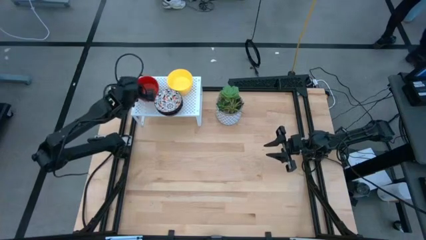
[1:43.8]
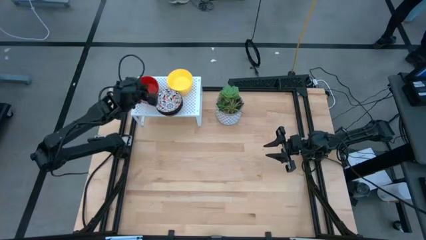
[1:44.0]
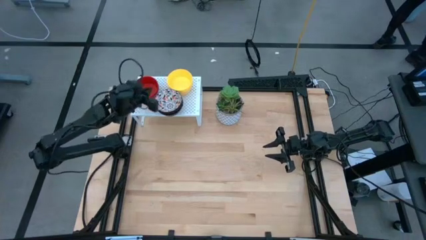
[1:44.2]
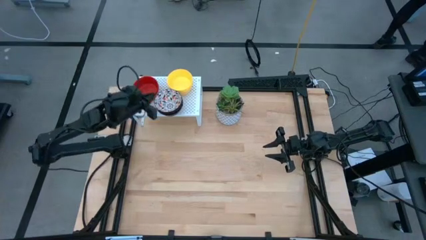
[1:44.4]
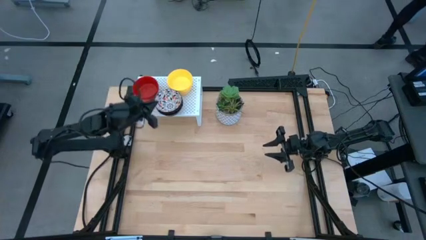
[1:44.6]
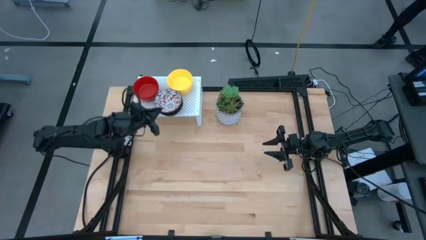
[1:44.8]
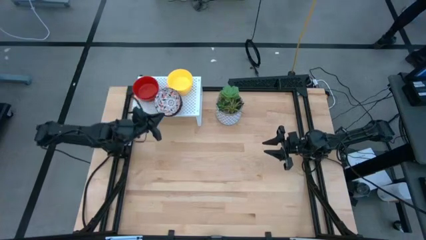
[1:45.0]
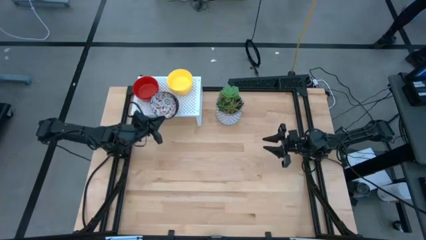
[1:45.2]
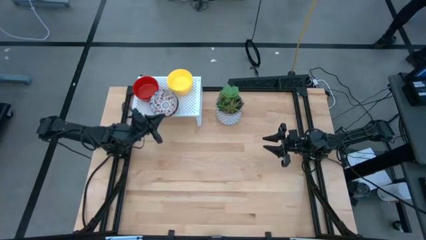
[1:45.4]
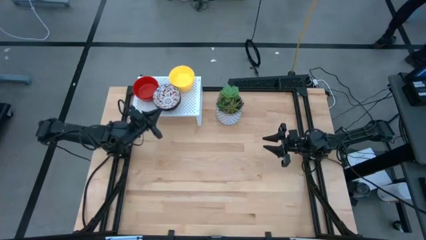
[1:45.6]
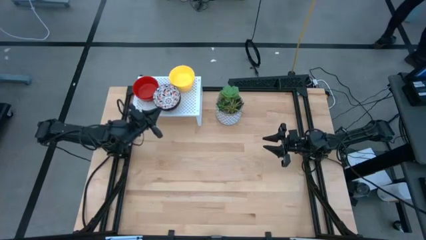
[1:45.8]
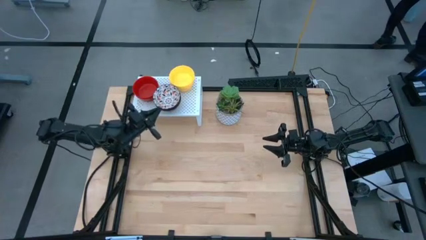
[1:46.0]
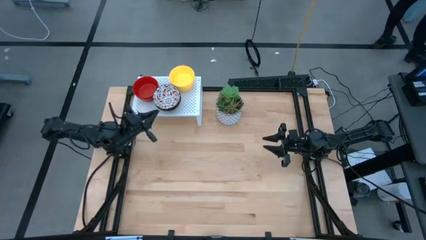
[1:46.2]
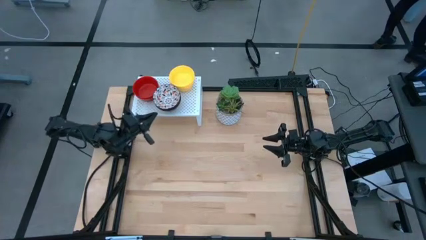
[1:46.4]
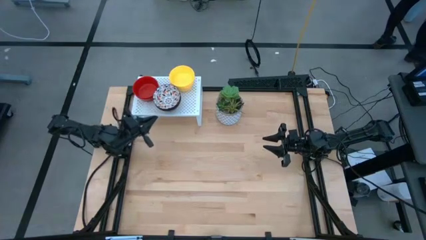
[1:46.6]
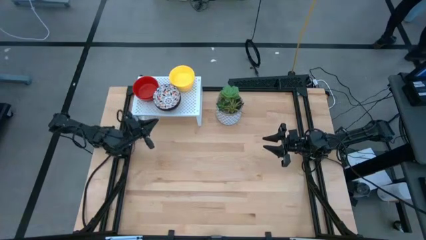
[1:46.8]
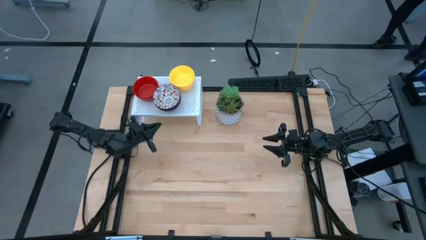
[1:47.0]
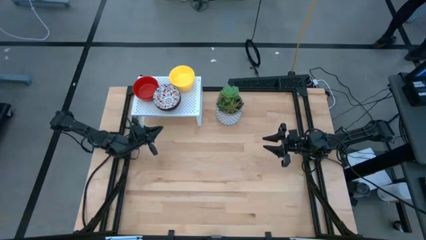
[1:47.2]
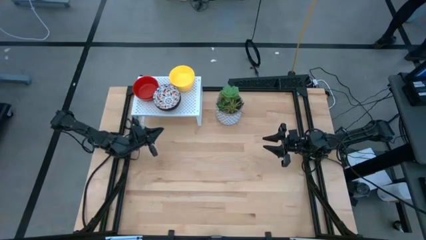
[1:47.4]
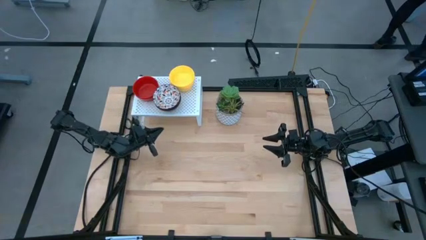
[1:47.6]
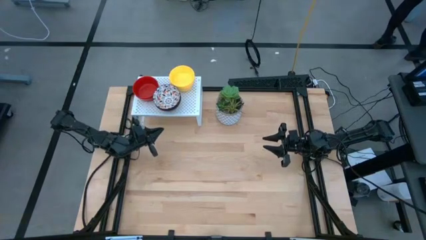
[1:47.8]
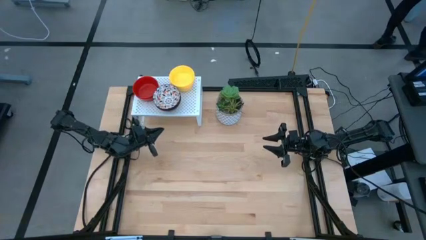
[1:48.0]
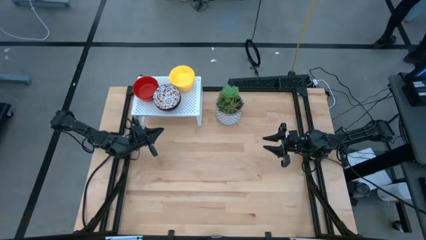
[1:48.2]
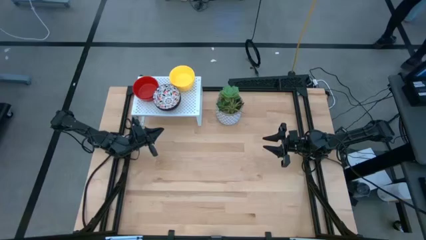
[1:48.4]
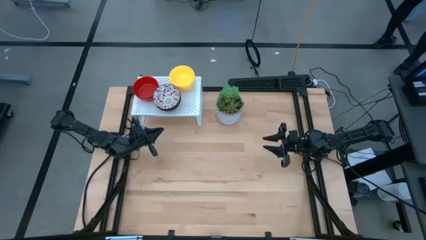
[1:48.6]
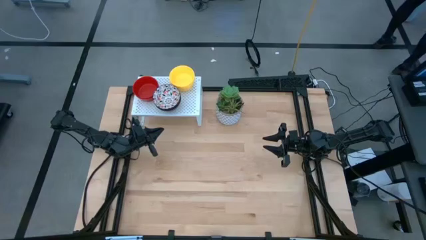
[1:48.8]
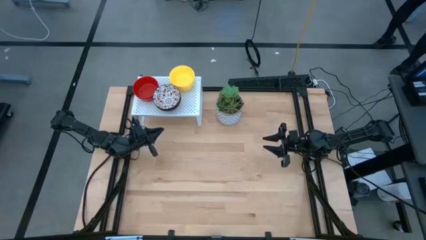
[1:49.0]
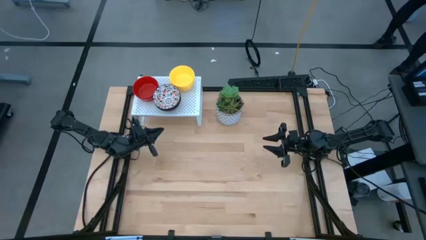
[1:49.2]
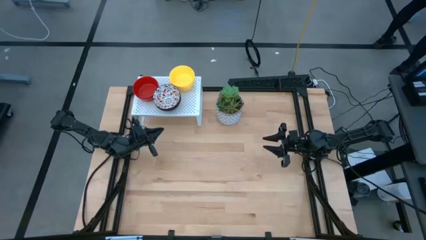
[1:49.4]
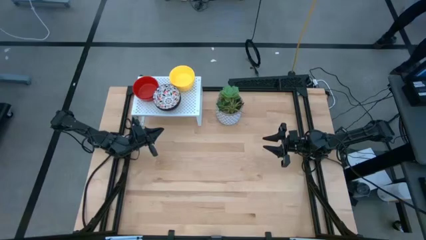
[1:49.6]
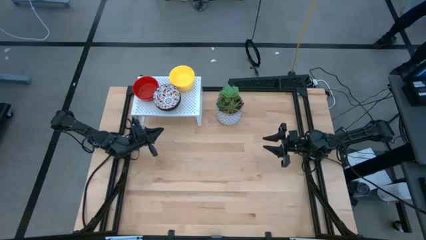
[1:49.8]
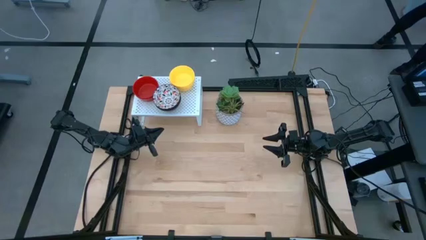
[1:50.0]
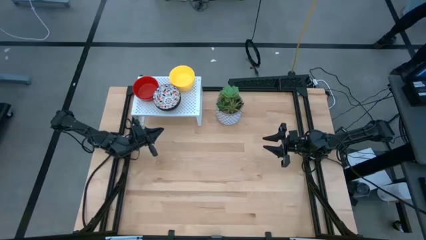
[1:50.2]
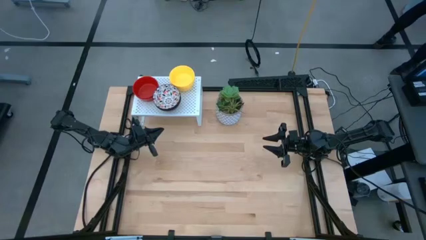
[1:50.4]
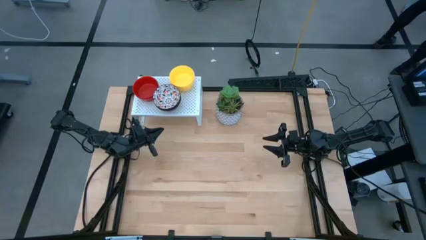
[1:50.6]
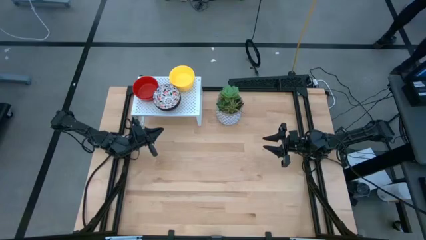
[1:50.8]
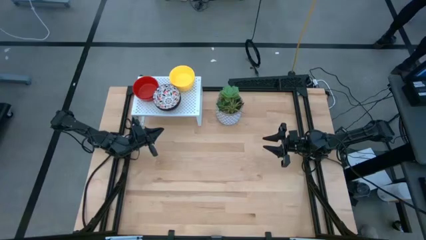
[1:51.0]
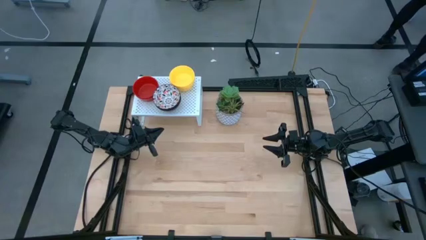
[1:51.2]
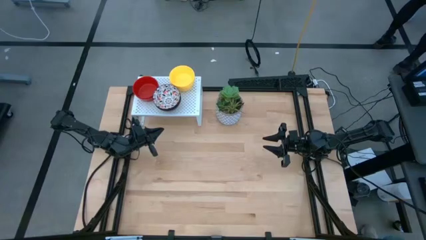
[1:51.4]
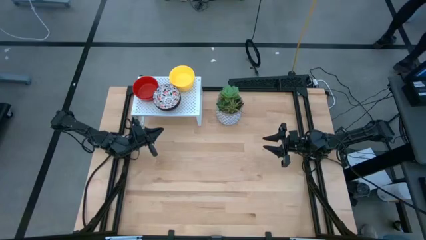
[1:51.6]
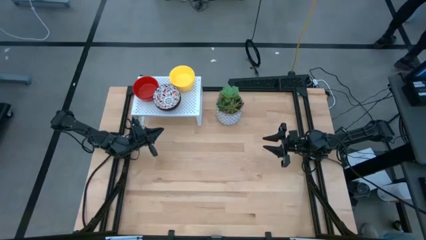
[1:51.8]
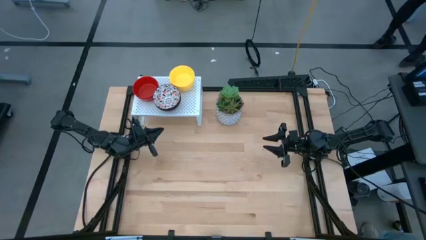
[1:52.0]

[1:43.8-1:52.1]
Task: Pick & Place Mini bowls
Return to Home Position

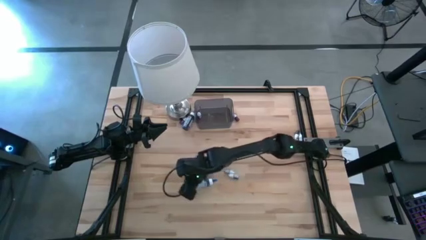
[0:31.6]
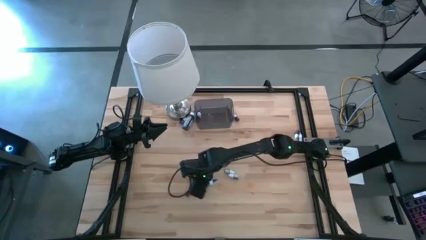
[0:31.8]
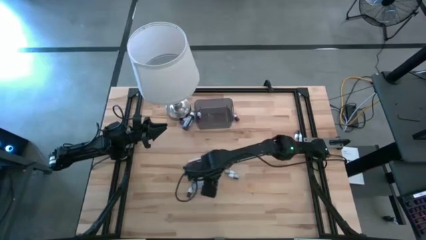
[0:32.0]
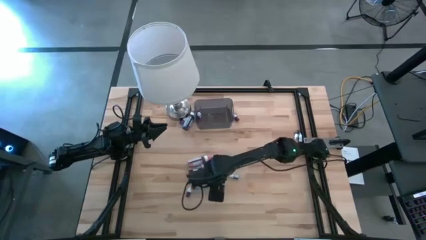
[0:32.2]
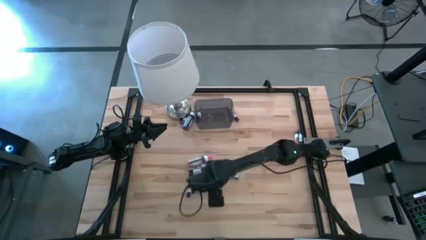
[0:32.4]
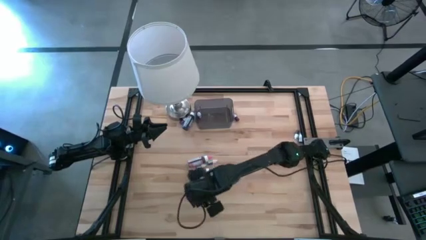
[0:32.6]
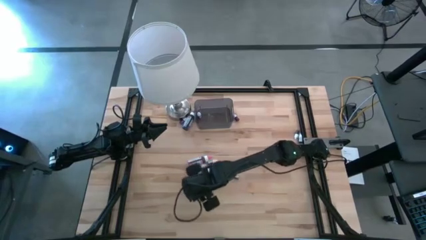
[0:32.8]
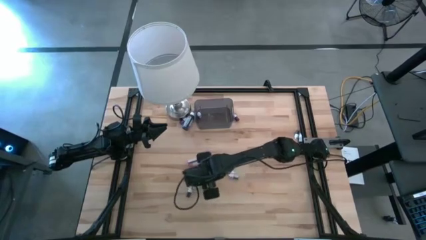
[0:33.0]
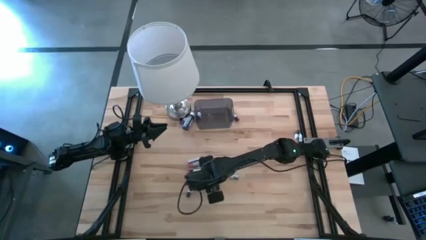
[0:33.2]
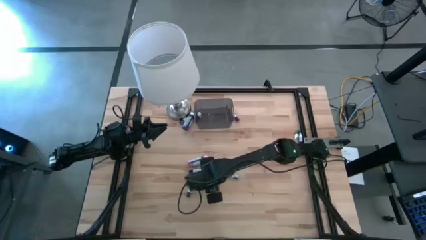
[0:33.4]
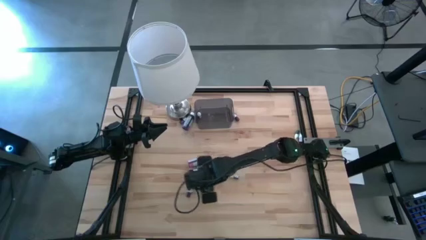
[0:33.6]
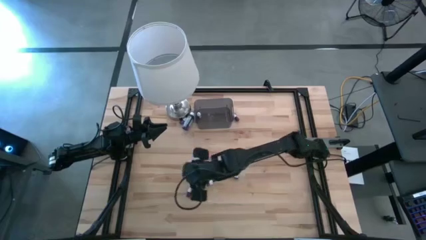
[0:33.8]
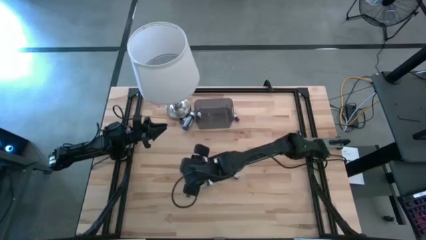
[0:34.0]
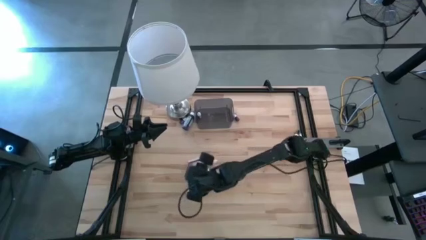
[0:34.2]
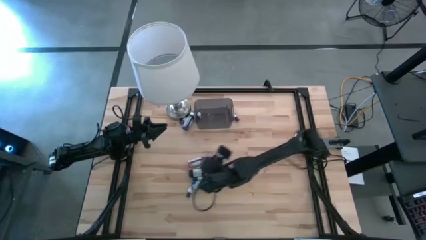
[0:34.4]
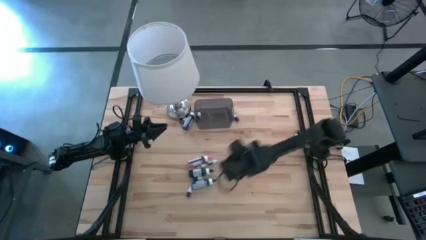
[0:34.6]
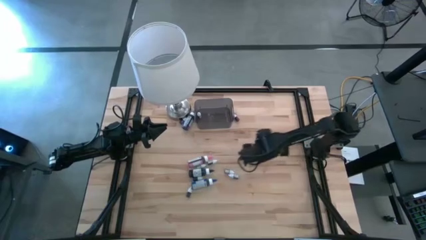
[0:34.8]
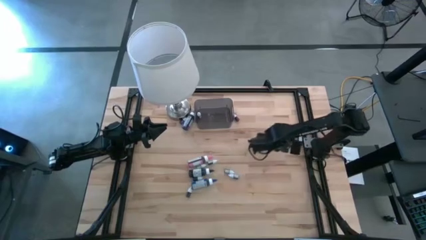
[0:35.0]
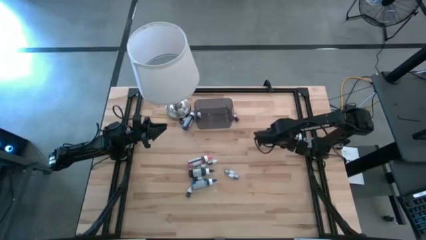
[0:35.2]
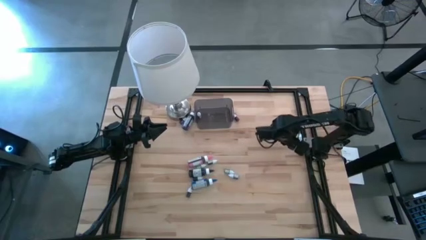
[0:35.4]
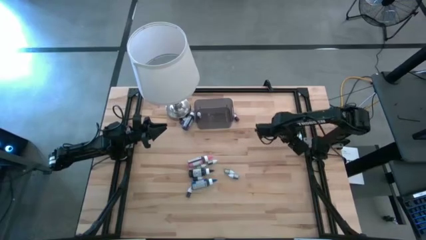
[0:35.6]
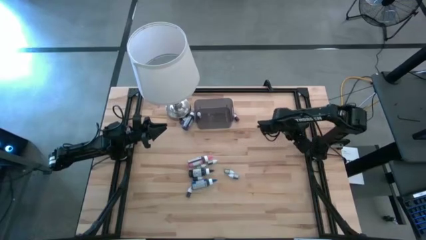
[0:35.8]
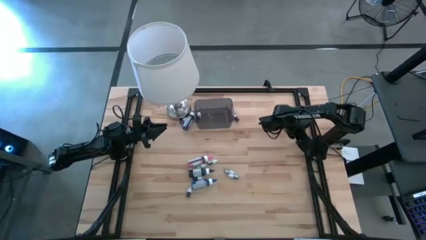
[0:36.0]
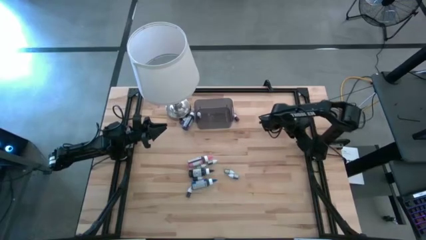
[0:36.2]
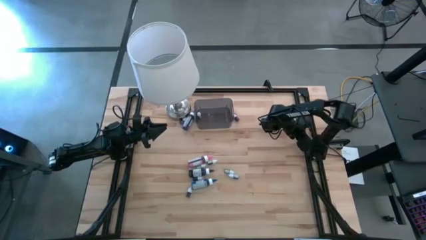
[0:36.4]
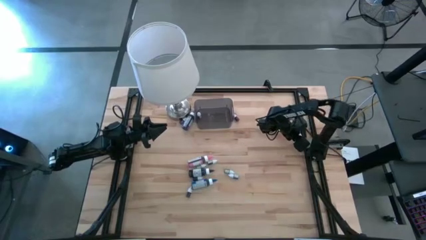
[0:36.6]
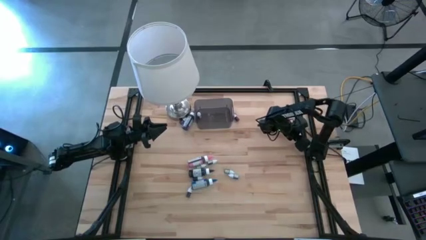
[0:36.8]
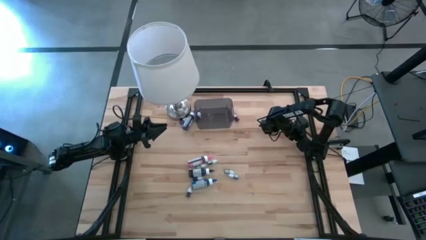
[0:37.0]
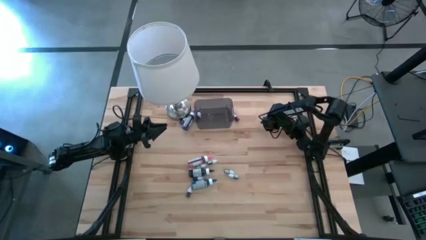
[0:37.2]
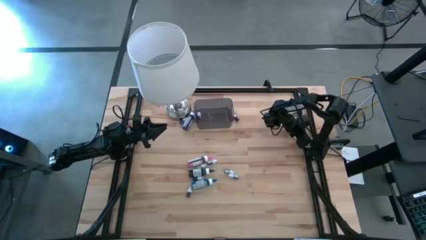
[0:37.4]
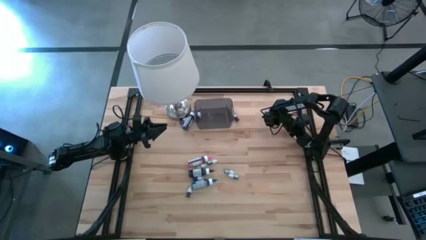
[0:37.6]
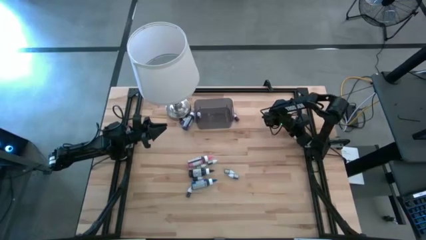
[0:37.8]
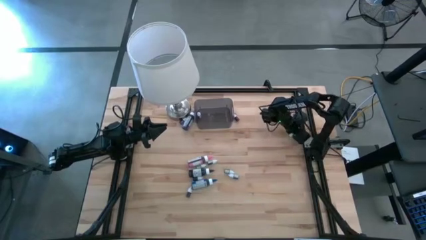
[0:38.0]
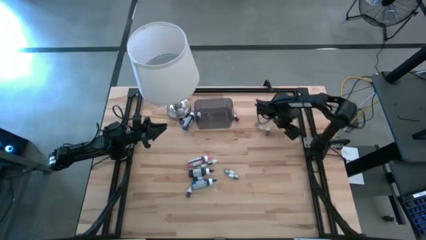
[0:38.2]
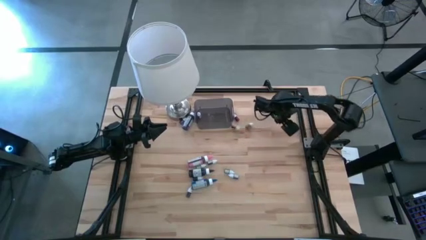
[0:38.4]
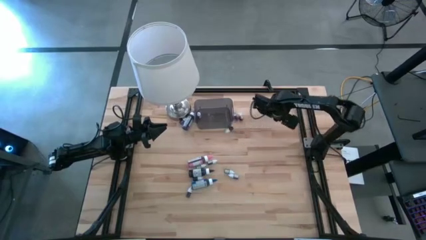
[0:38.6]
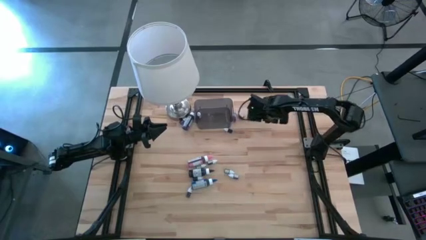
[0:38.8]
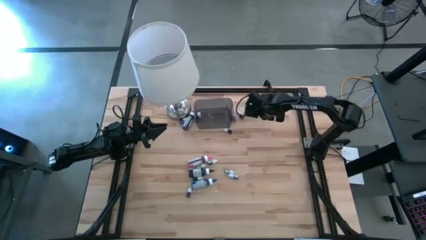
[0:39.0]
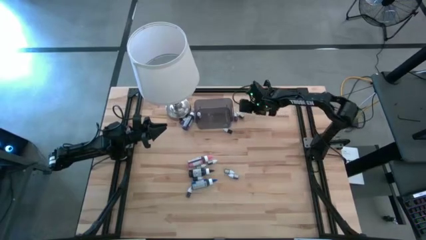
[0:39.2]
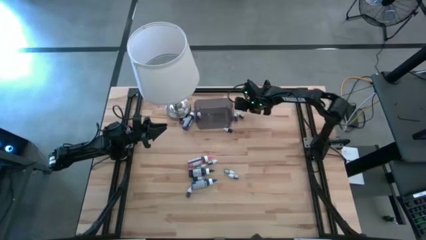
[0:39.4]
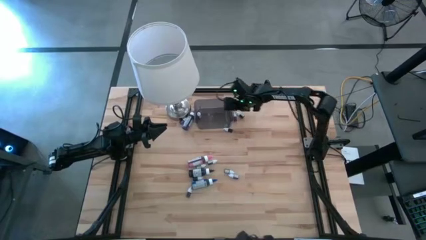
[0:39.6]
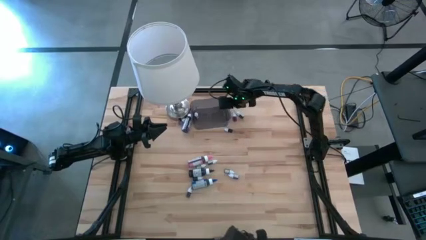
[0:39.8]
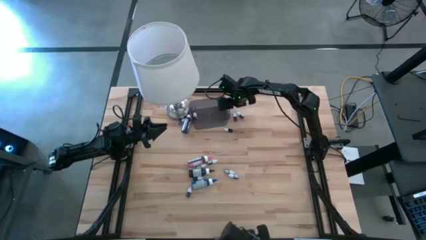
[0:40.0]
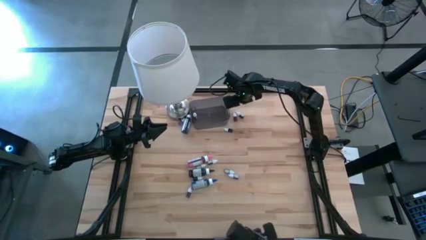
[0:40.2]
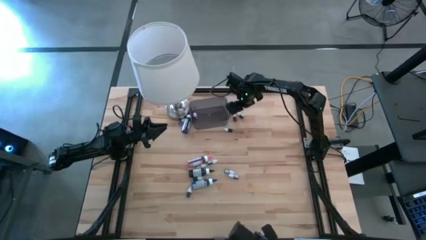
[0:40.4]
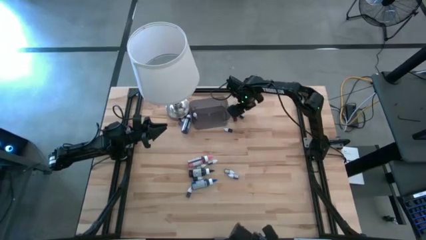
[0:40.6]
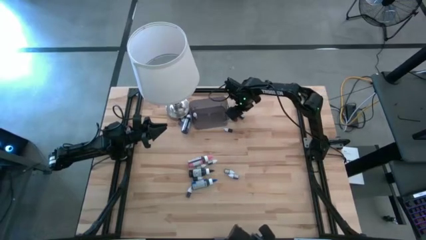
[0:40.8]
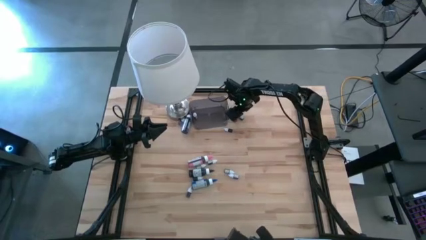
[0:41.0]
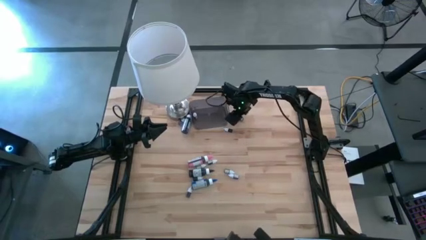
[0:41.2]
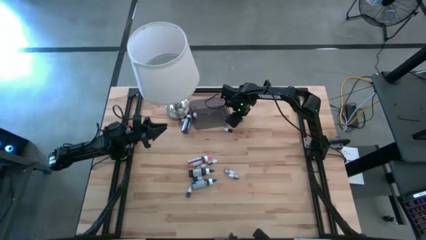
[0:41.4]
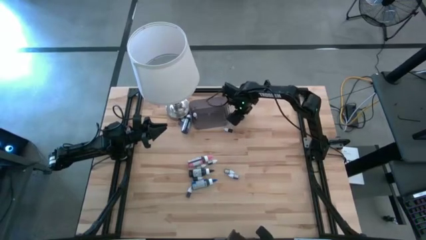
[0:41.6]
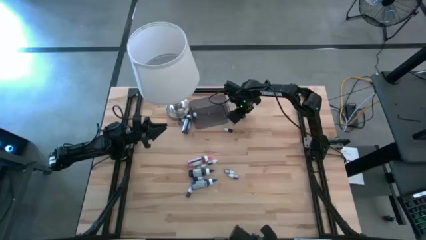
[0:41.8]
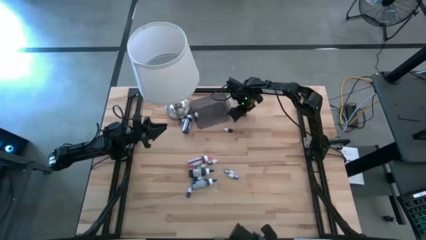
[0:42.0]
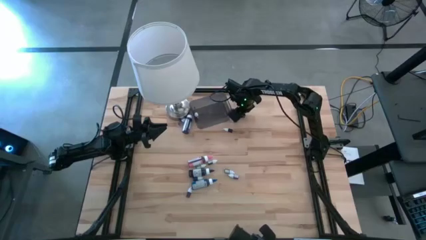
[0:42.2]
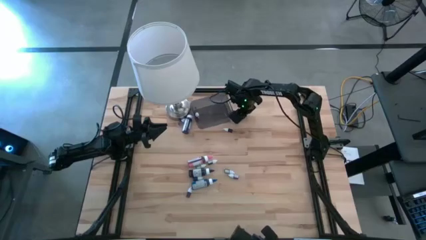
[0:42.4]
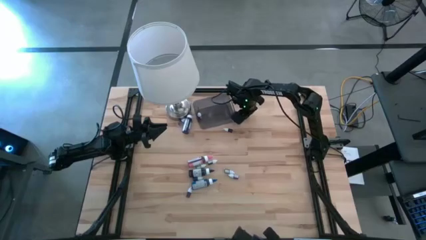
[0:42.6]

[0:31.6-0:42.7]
Task: Pick & Place food coloring
Put the small red food coloring bottle into the bin
